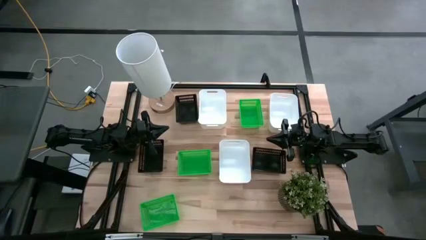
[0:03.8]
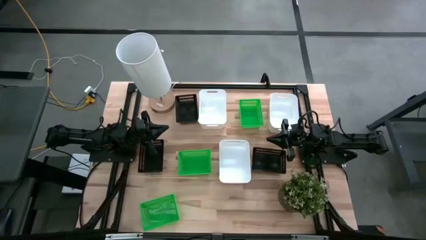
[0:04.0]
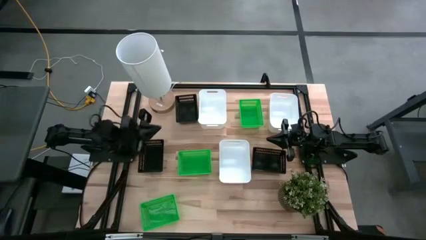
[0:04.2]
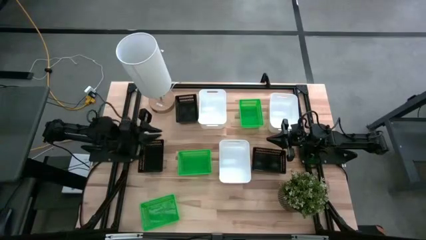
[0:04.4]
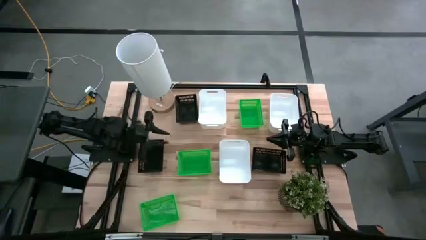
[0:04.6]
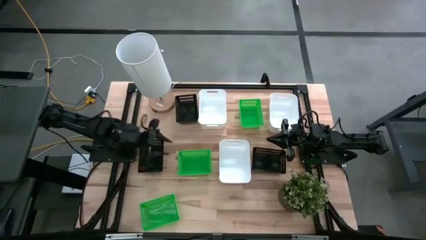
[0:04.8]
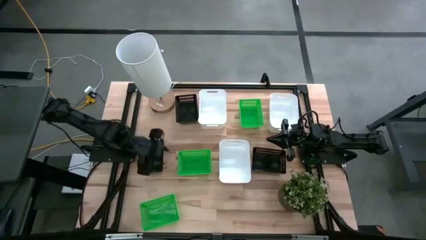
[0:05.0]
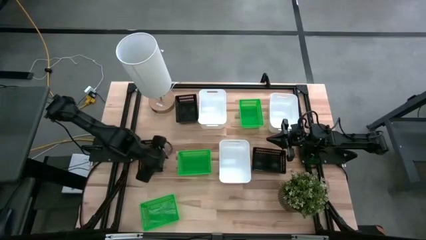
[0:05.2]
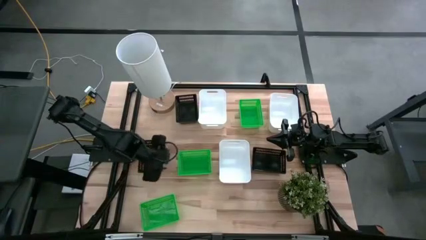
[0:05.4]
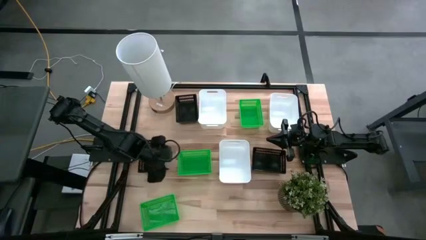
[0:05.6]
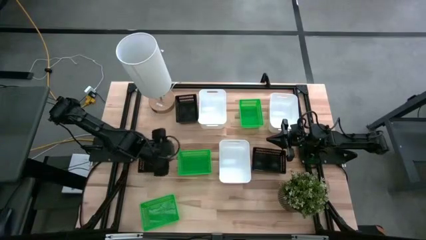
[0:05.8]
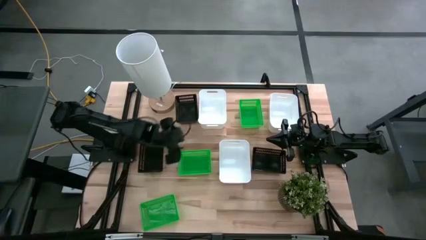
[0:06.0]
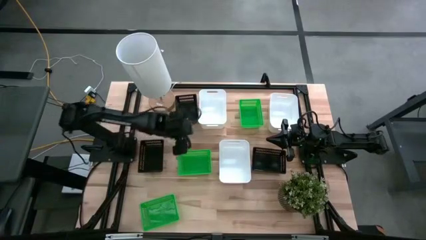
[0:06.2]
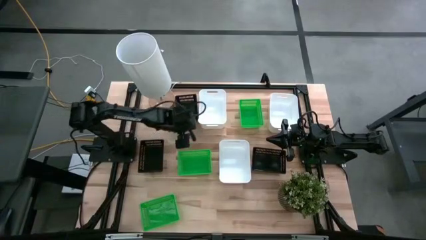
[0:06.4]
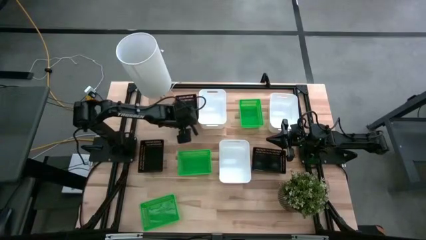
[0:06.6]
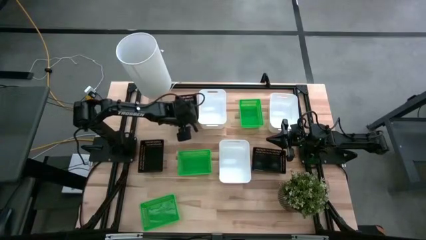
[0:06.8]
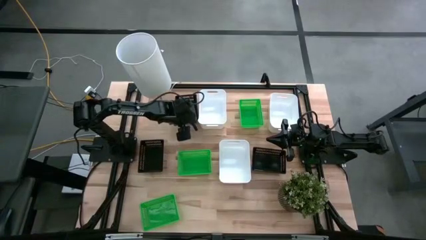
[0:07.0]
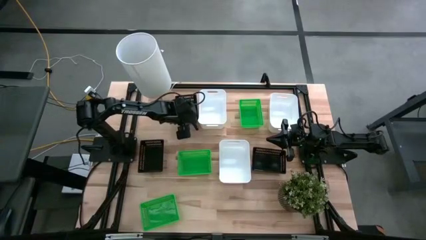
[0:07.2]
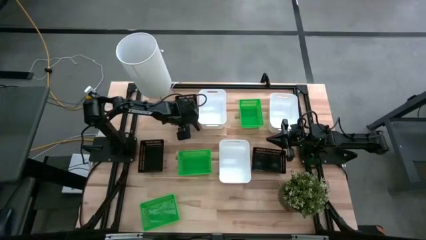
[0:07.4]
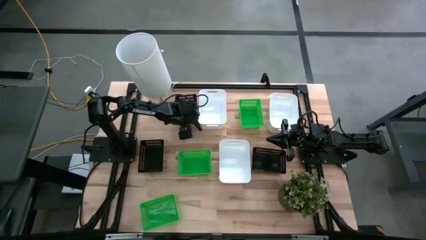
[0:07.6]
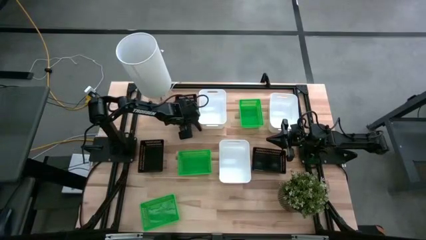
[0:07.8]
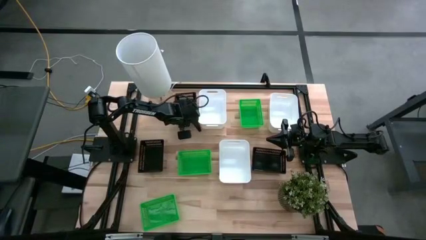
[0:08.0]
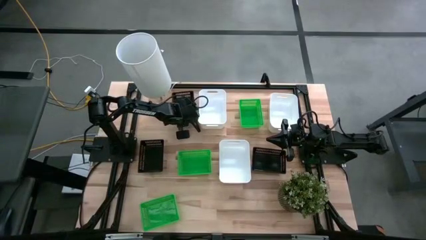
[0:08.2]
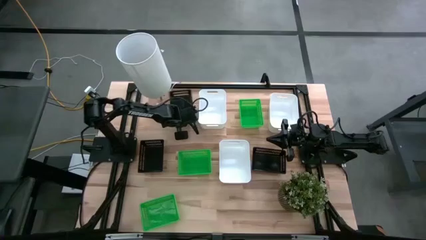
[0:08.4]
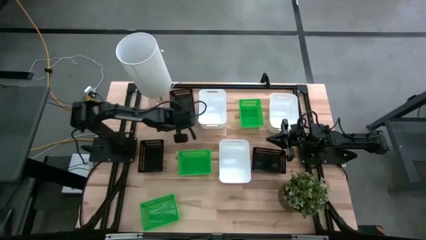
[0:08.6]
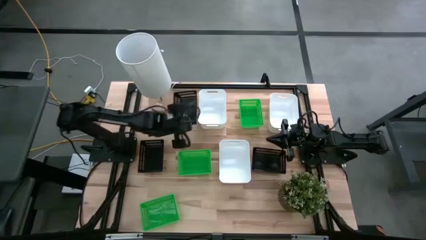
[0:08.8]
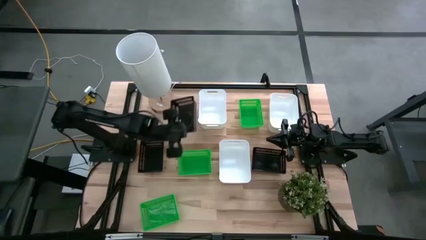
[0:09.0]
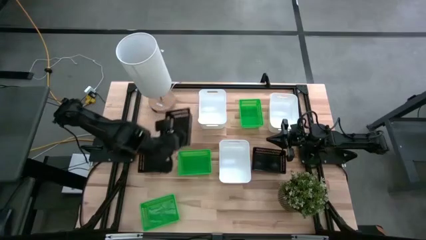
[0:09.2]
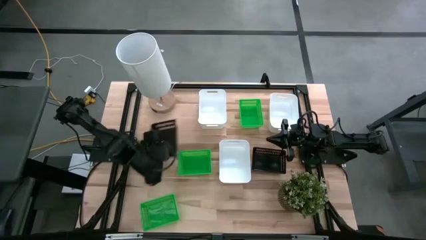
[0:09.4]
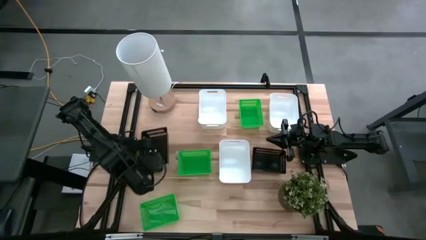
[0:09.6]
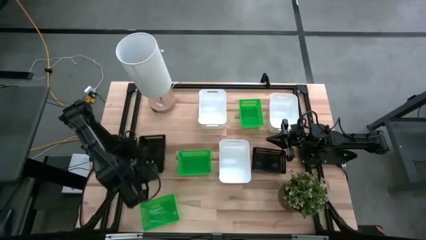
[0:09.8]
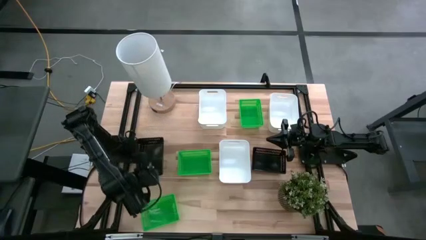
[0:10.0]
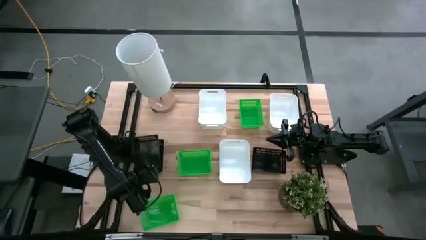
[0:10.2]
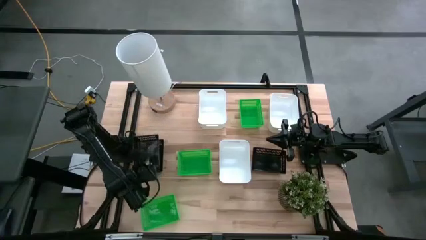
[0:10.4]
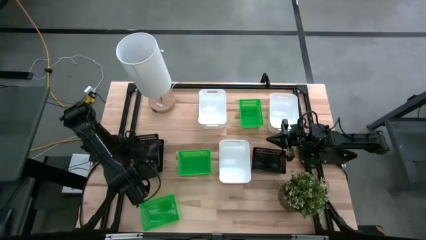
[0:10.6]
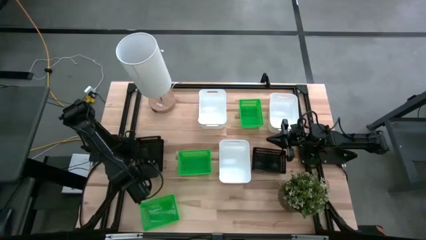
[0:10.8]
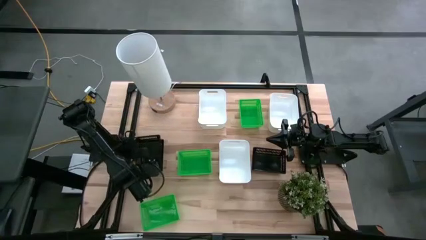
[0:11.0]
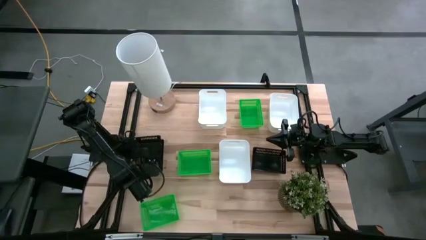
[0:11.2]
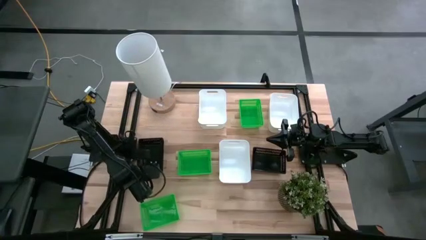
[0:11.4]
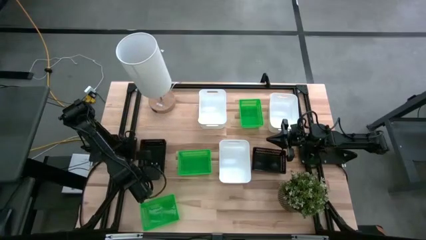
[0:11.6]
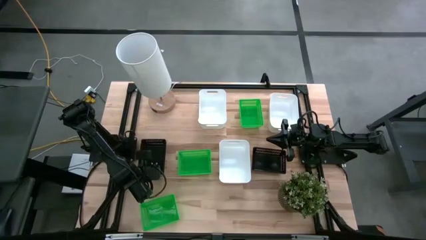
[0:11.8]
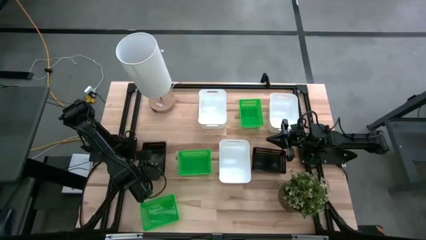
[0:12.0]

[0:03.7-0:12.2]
Stack the top black bin on the middle left black bin

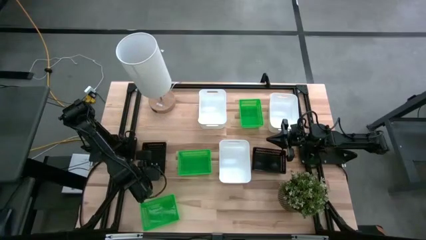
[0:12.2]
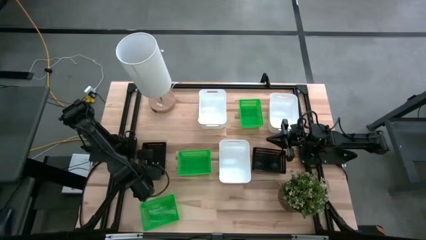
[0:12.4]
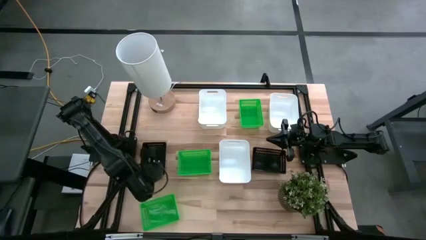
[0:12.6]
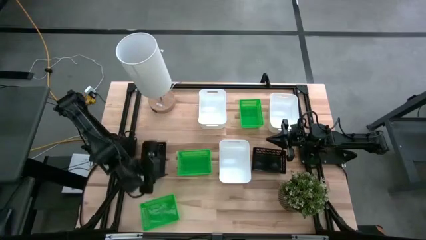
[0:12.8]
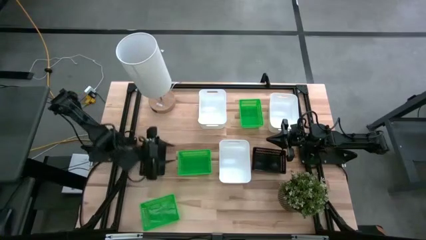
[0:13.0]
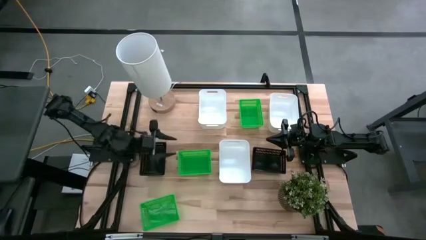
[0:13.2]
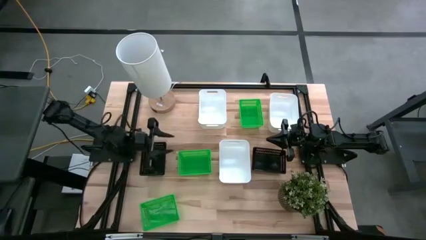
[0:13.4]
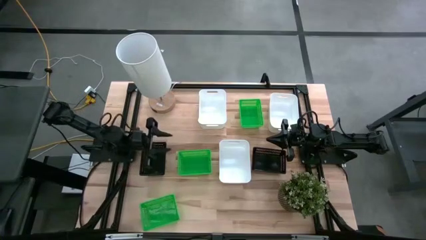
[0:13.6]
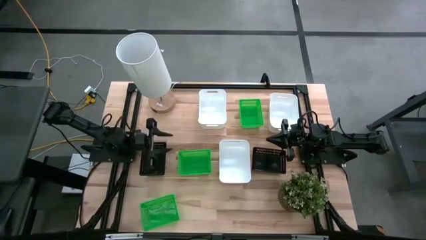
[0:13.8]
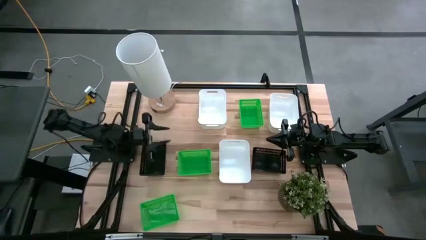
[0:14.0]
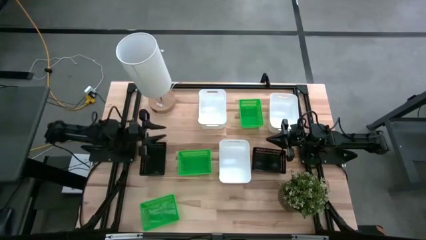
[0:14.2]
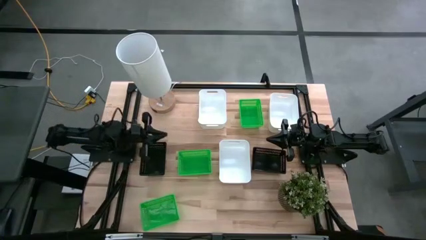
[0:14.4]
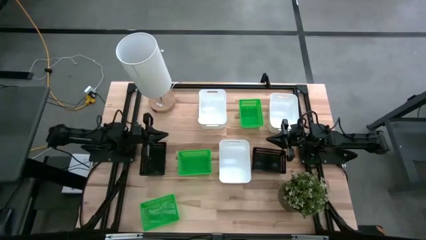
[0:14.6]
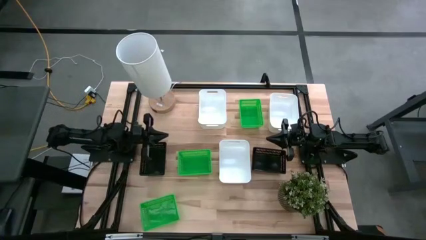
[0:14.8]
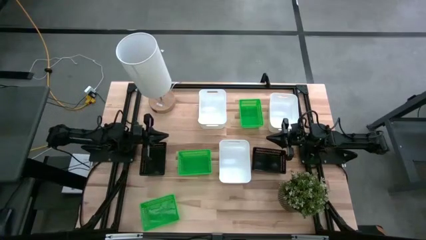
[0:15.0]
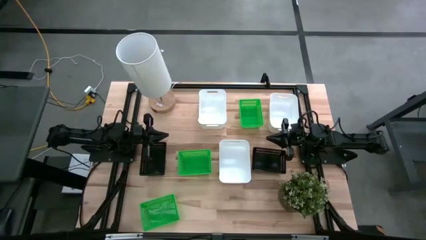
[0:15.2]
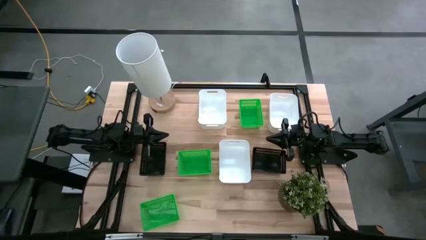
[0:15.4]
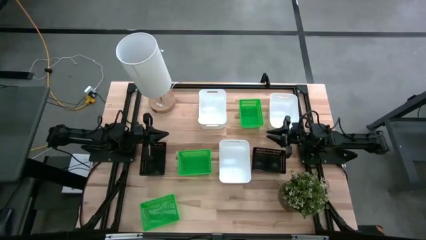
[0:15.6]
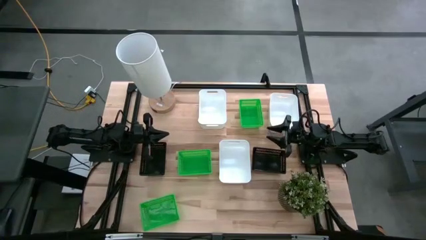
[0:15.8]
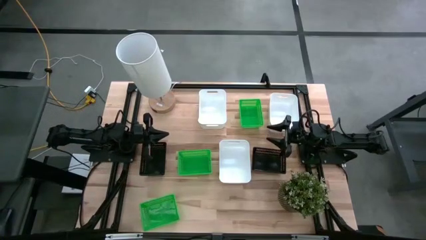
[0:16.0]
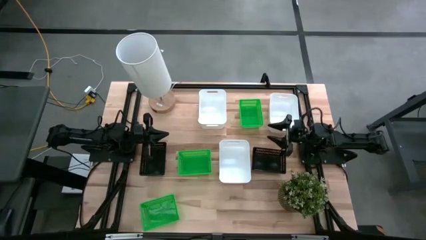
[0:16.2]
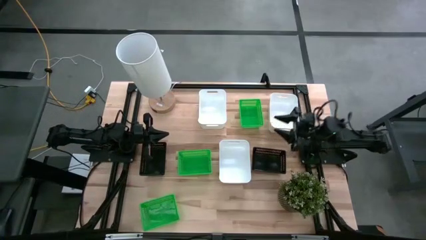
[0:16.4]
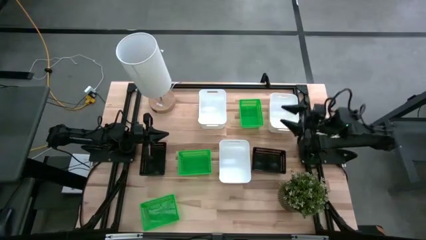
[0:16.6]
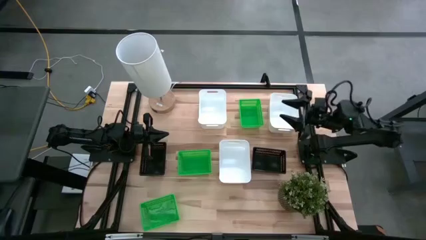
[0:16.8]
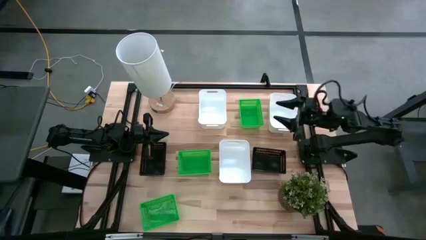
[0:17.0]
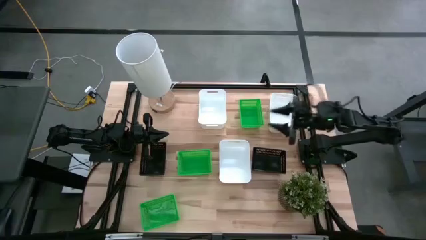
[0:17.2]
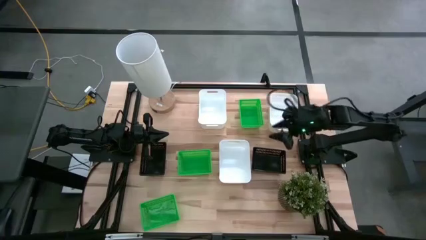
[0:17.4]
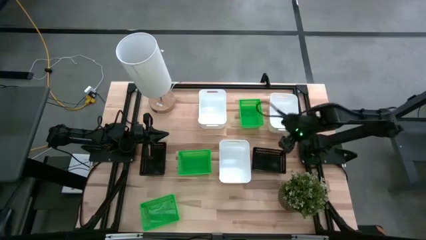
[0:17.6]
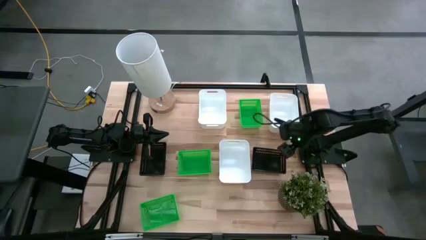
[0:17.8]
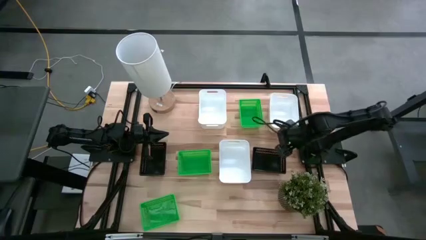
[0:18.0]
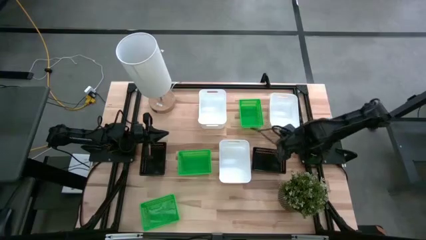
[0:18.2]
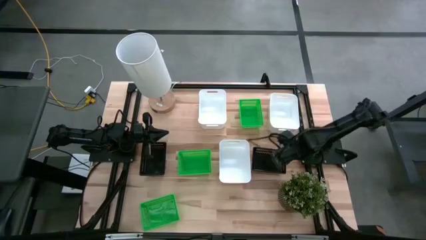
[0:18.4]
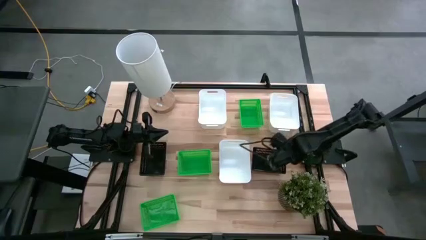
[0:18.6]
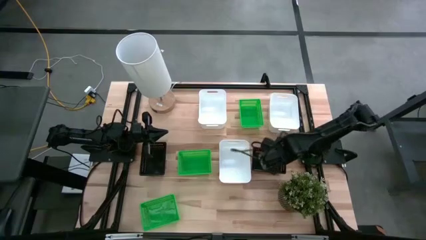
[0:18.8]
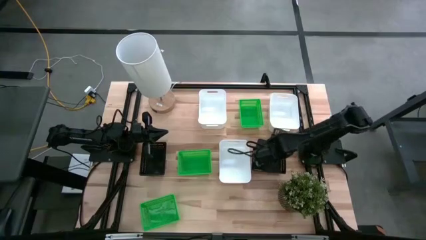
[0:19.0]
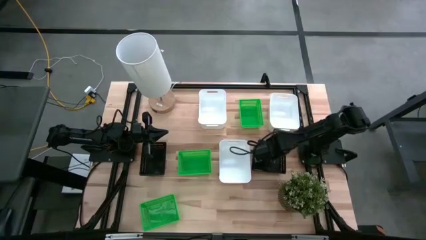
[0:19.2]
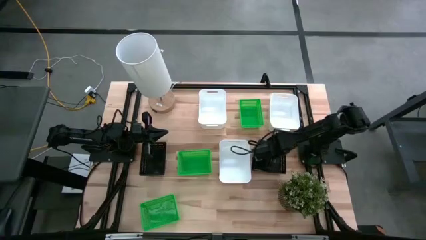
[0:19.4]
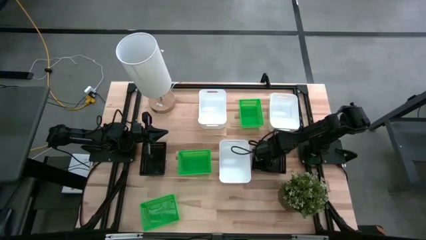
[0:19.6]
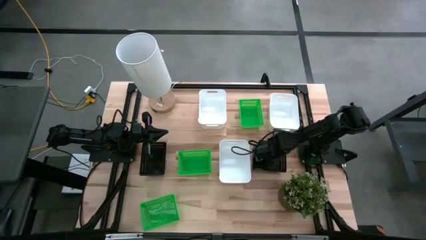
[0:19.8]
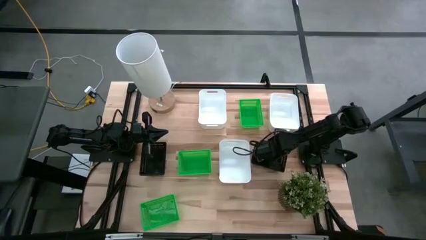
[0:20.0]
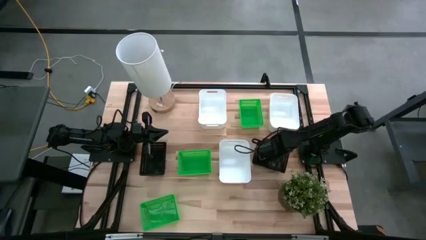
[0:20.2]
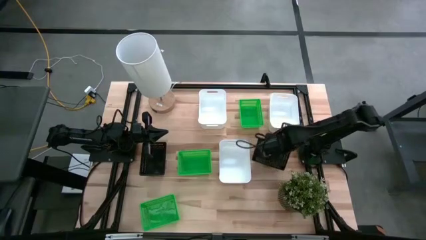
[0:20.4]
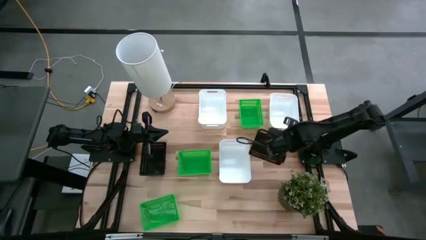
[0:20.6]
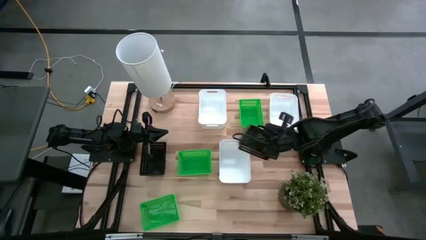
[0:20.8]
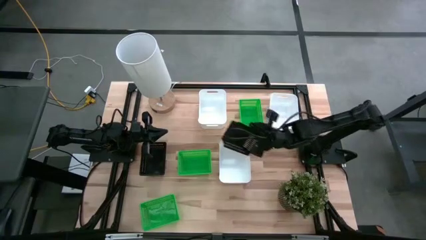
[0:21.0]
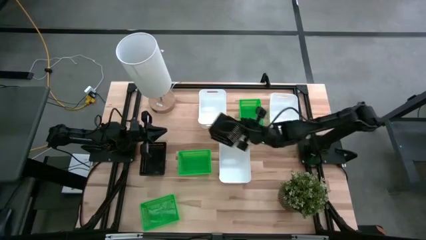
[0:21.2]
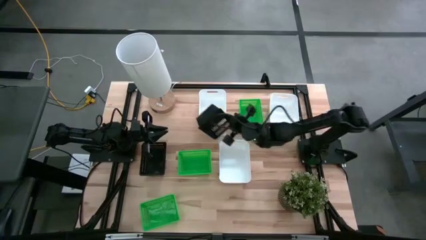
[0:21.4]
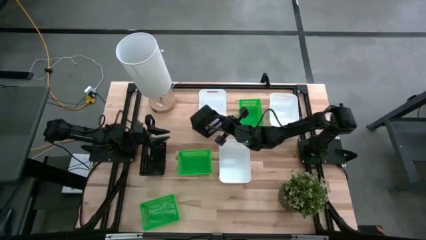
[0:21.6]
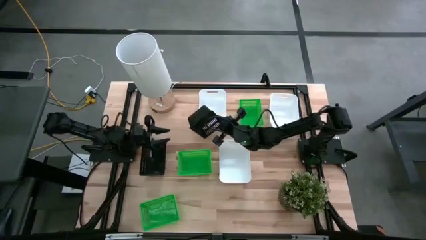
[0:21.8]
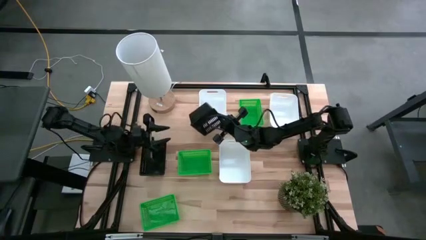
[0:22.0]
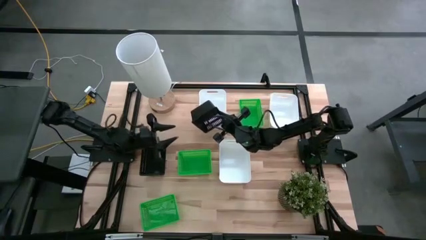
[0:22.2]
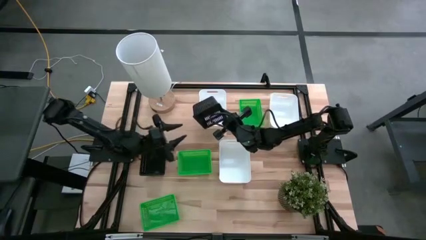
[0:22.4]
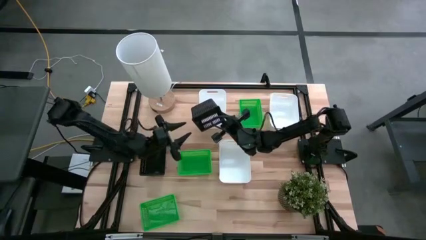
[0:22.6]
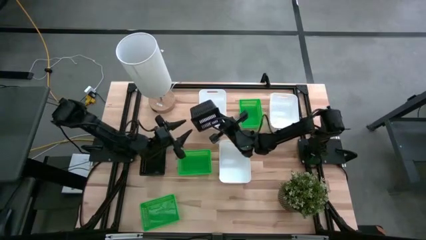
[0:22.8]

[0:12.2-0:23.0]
Stack the right black bin into the left stacked black bins
